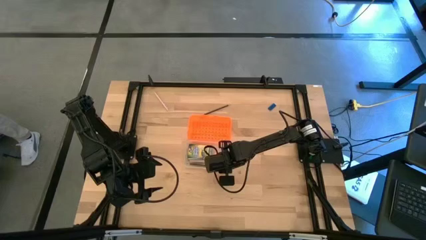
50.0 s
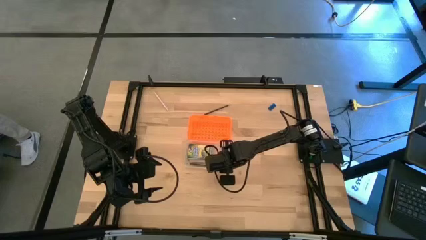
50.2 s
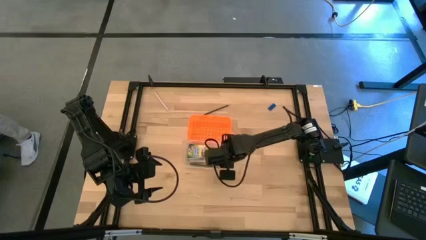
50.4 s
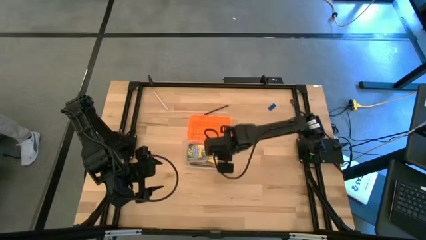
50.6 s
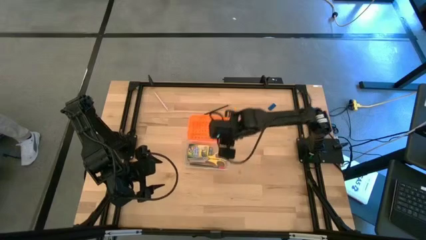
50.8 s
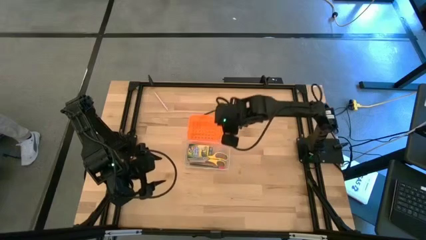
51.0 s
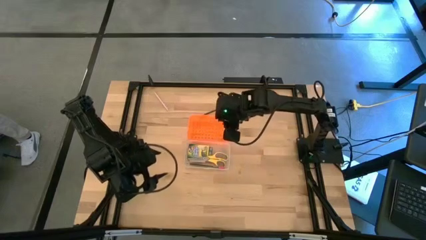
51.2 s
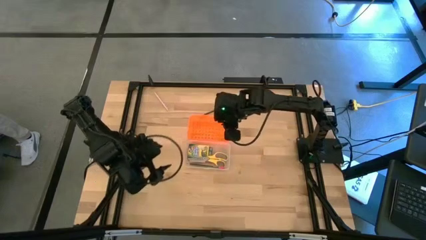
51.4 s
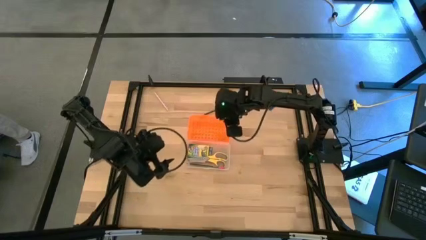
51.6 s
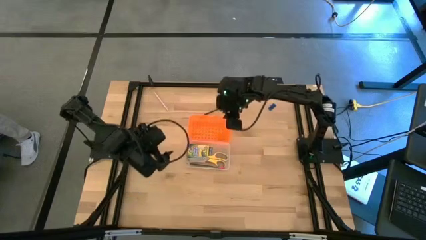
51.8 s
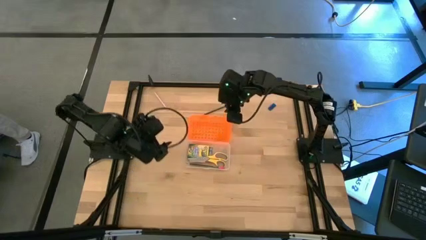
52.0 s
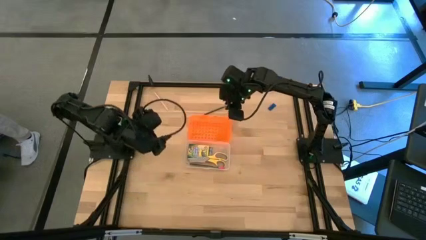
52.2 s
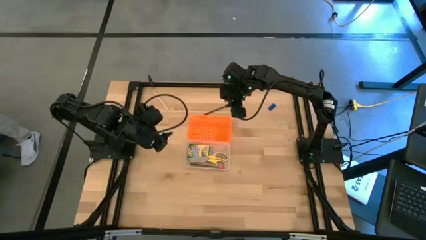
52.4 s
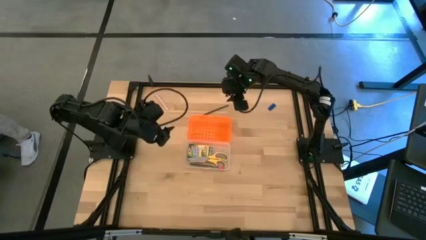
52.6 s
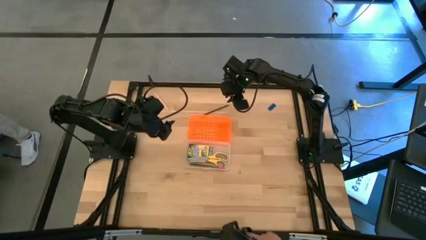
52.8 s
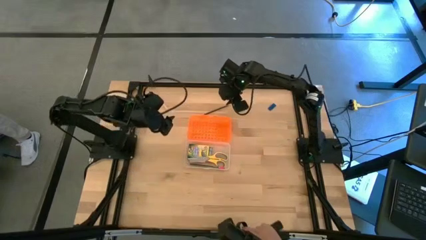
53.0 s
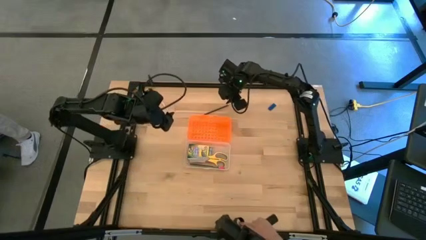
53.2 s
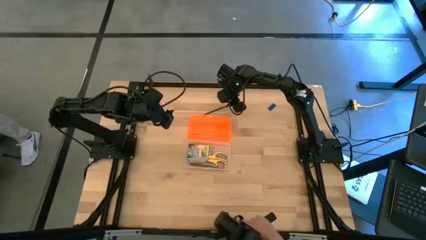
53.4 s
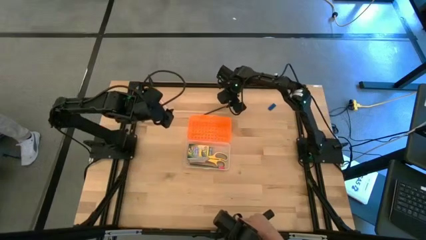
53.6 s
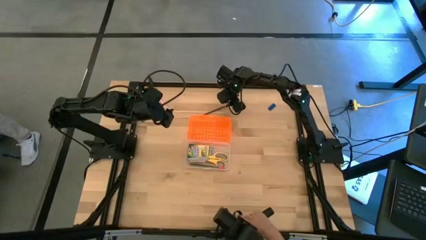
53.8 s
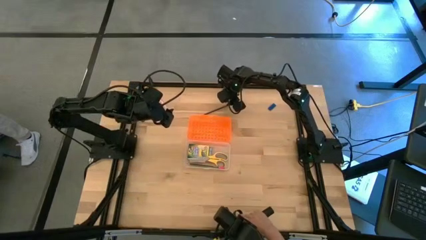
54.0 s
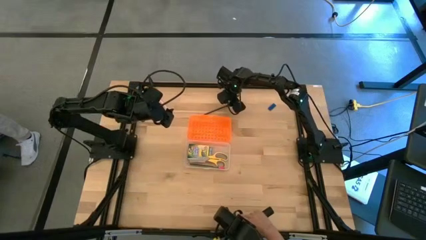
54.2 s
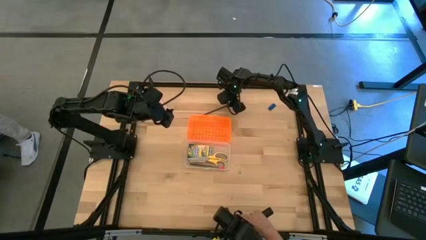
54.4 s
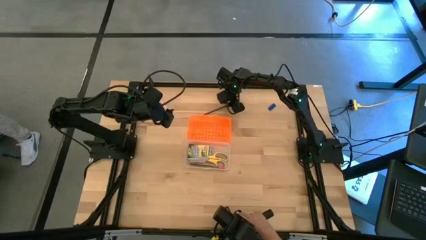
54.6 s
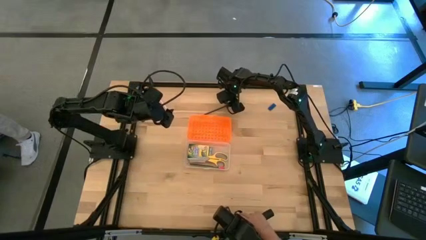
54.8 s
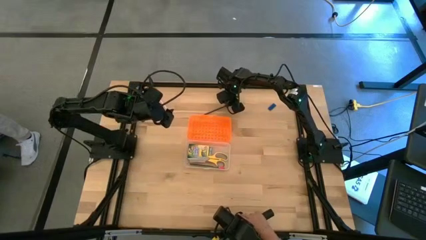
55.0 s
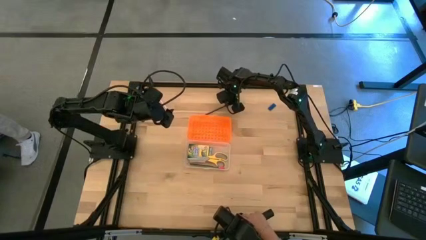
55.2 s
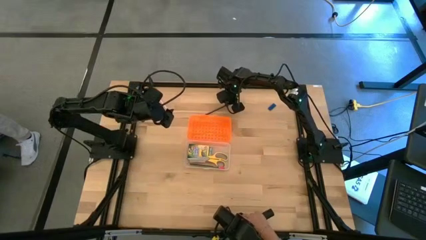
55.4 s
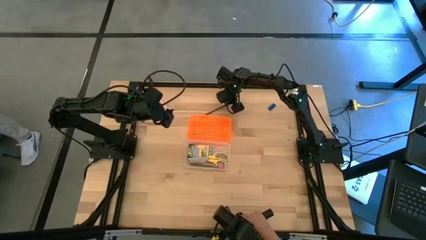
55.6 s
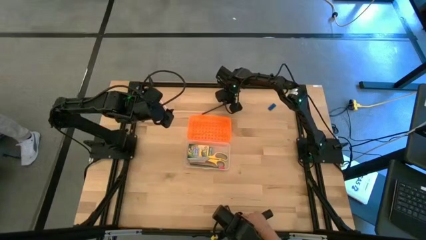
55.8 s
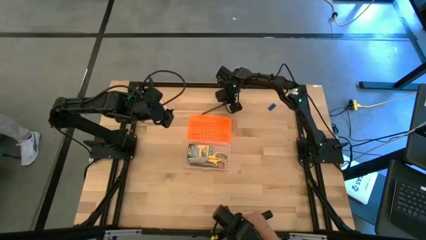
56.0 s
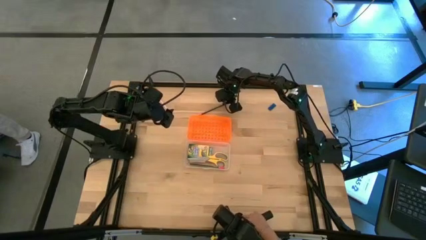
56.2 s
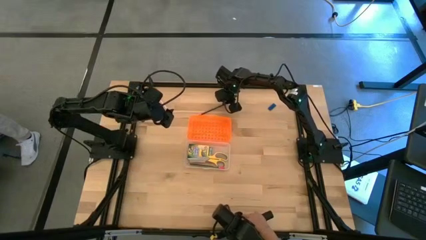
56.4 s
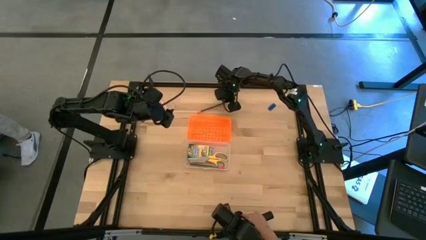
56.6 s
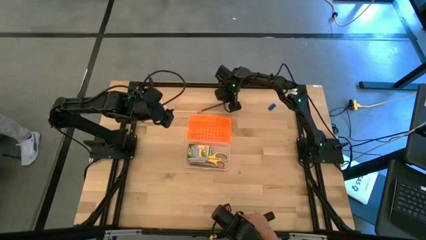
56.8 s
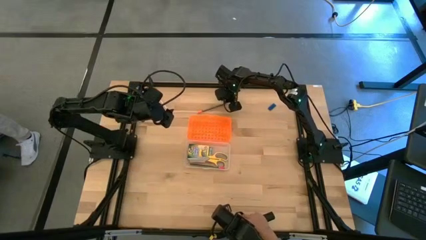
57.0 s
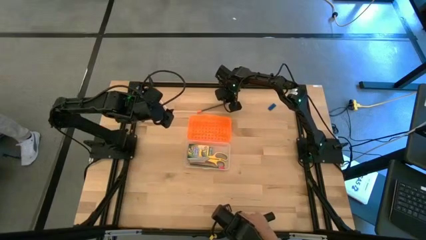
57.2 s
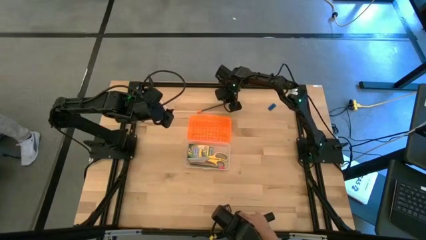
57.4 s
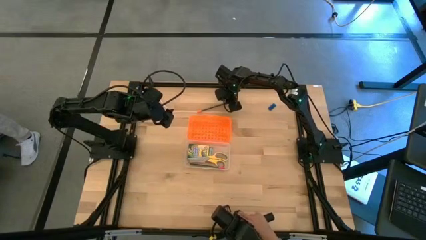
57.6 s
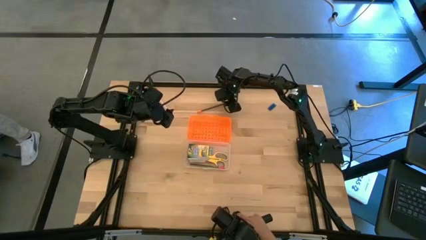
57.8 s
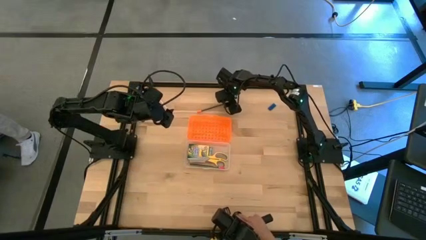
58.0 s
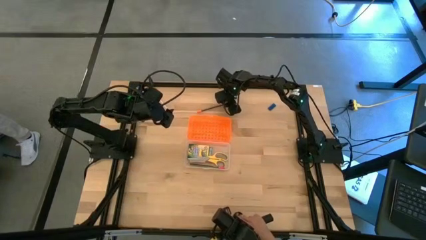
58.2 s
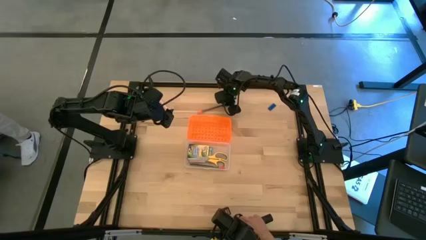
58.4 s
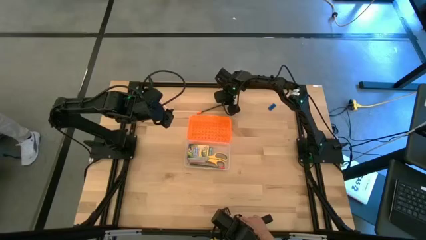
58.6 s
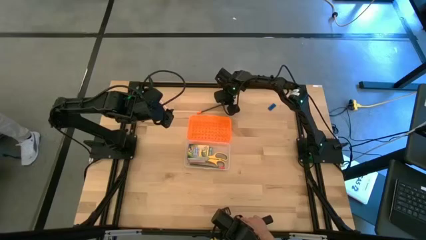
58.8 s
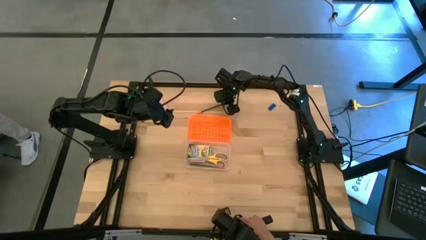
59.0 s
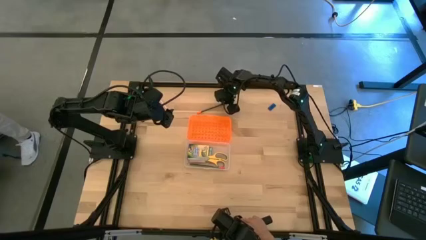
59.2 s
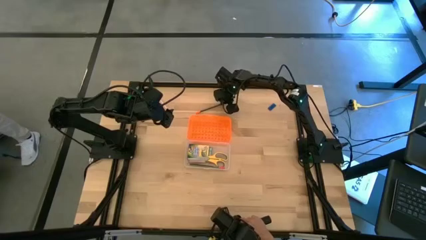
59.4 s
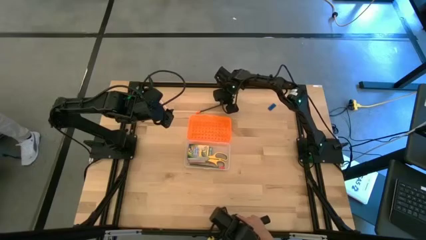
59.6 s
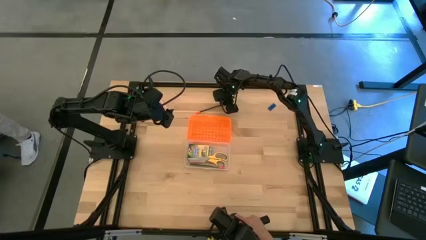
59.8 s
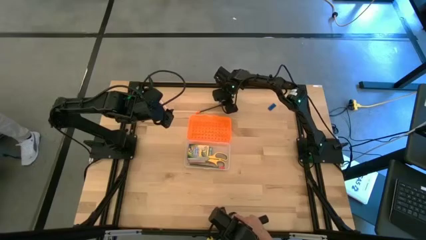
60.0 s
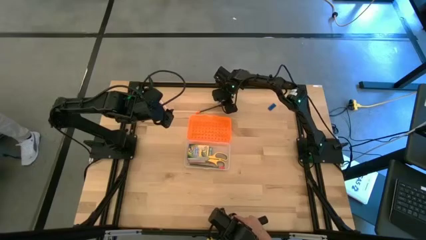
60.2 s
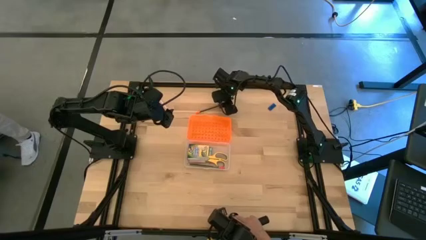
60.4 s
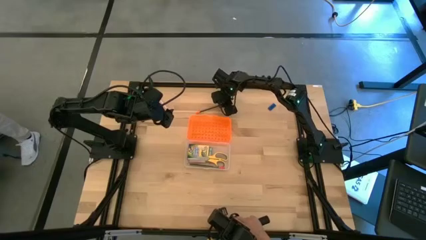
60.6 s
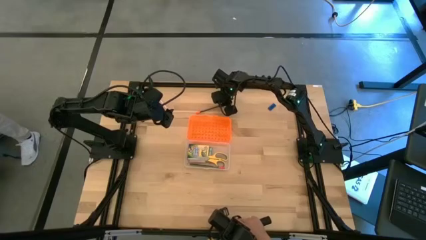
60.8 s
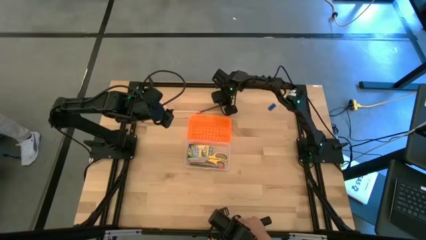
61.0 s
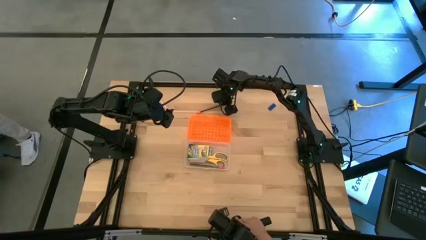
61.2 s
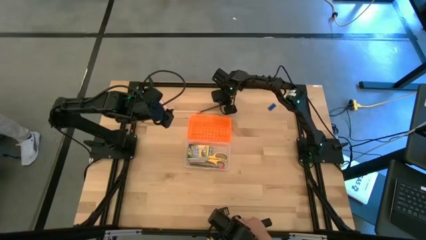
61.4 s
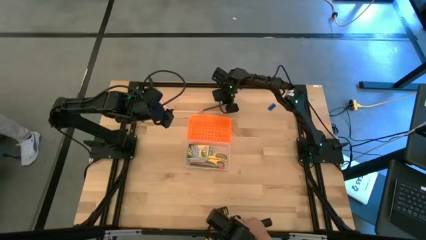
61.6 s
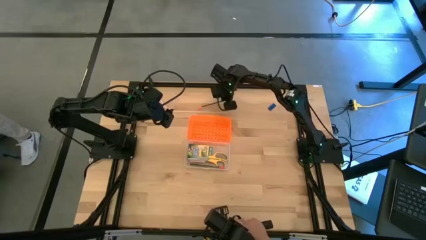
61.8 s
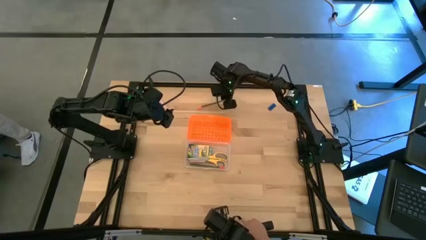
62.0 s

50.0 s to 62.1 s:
Task: Pack school essentials
Put the black pencil into the supply box
